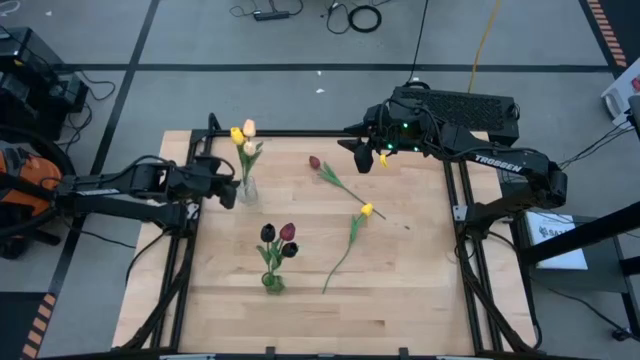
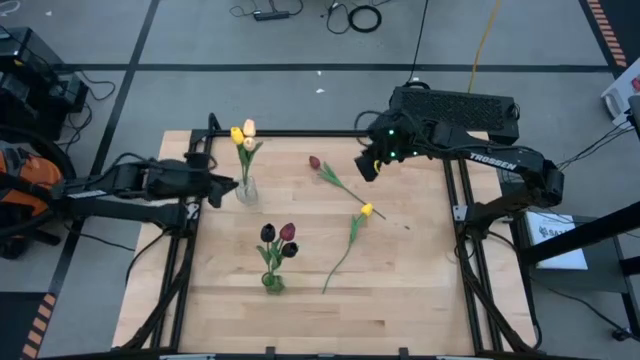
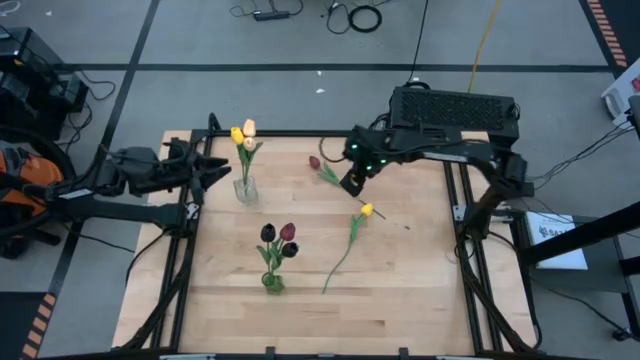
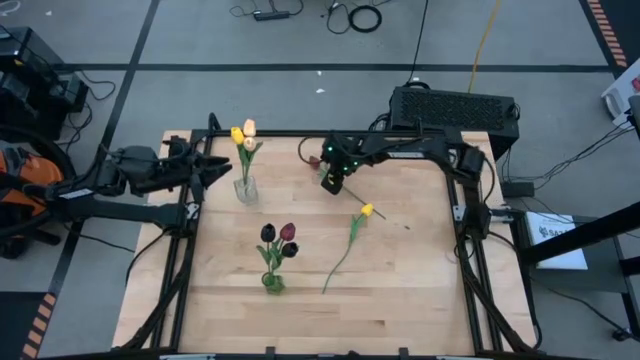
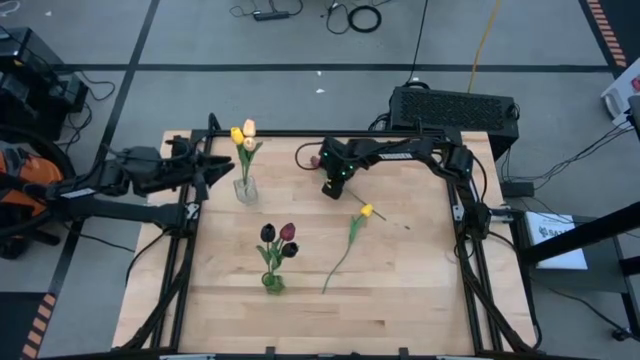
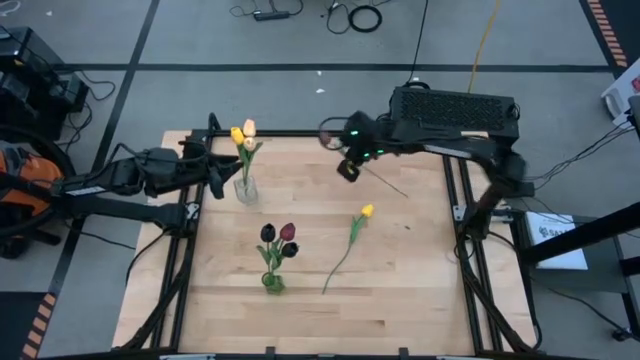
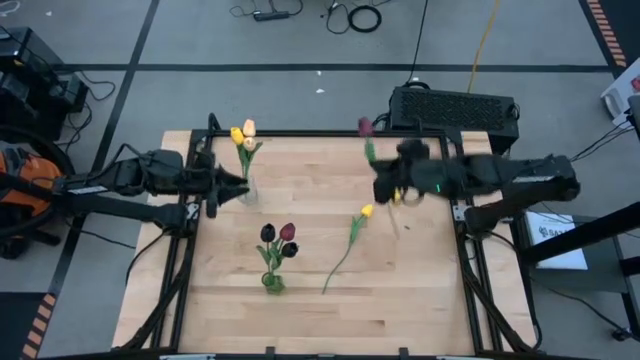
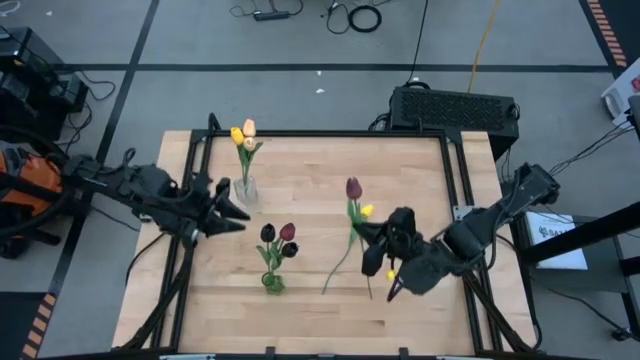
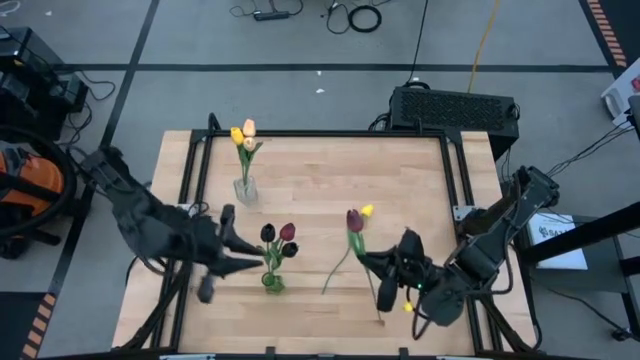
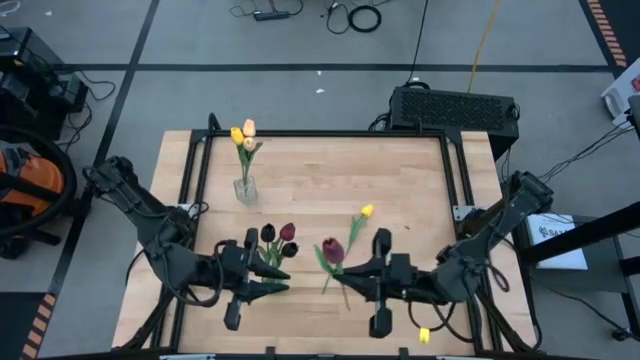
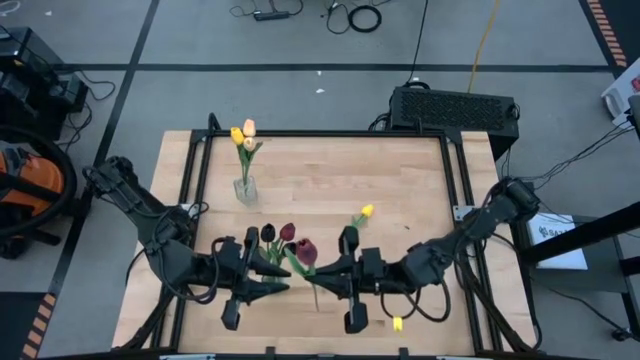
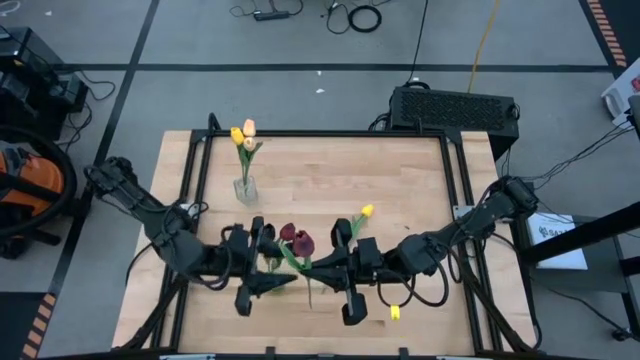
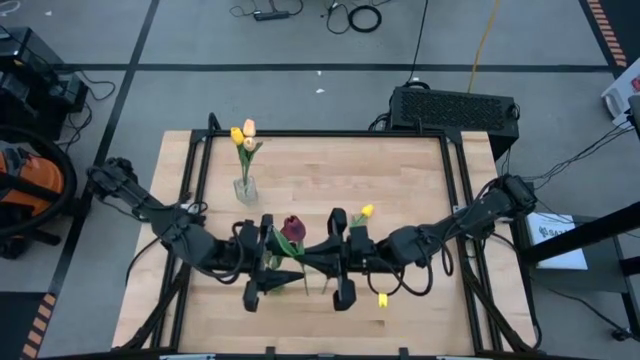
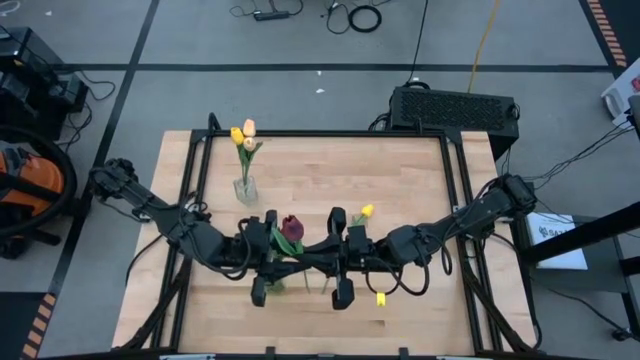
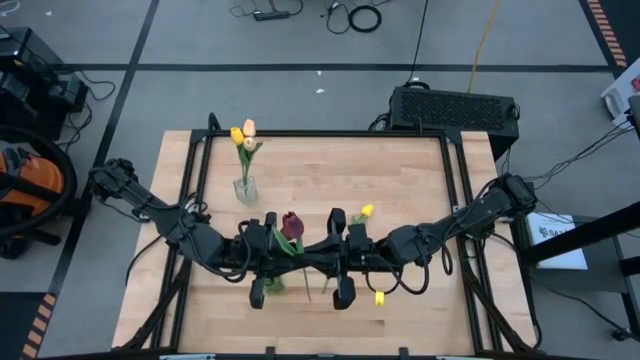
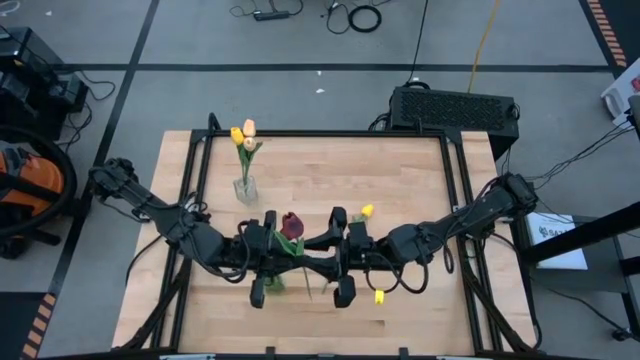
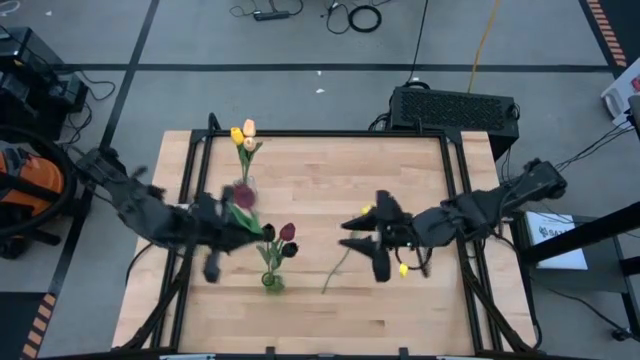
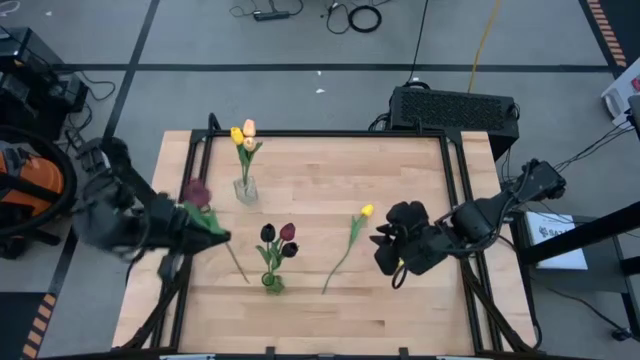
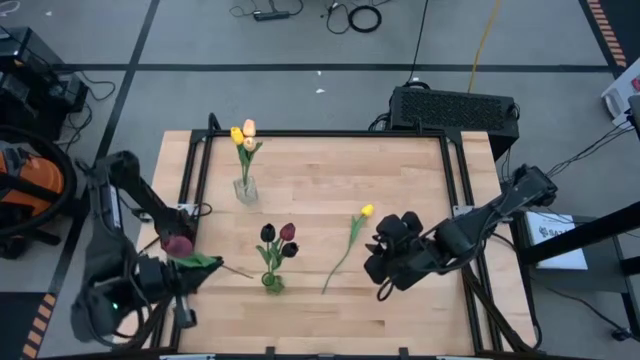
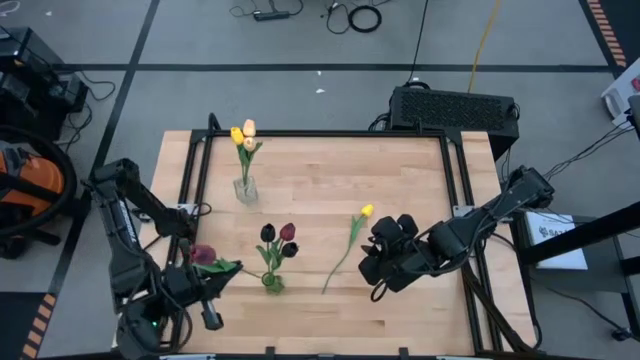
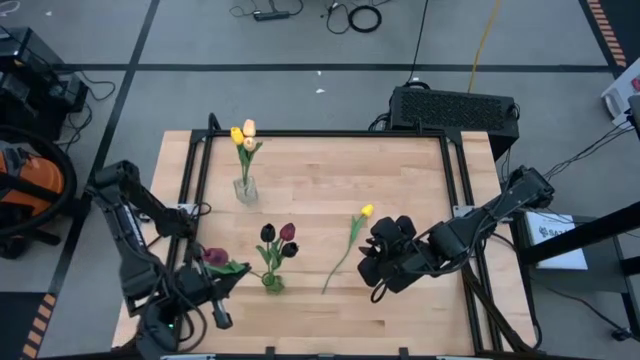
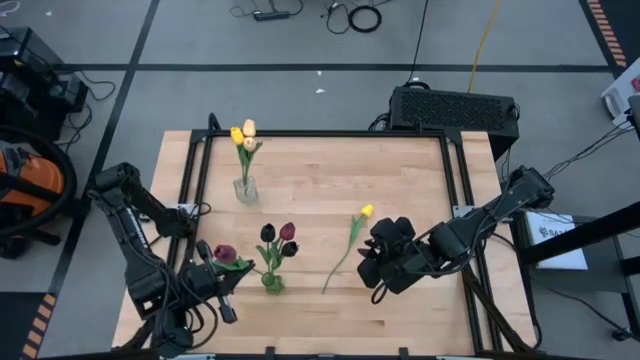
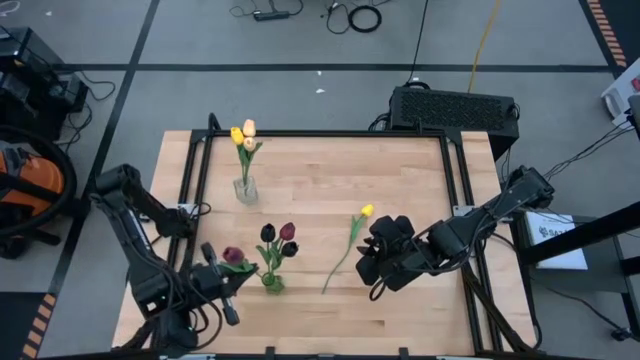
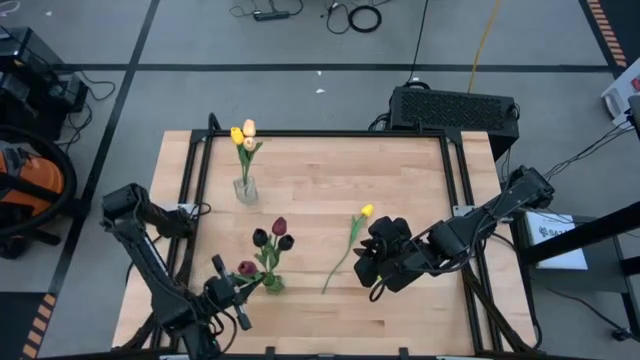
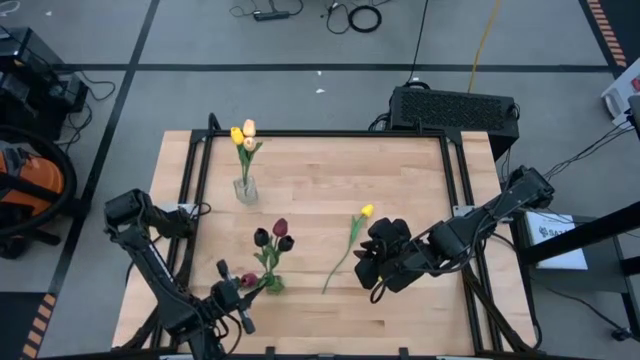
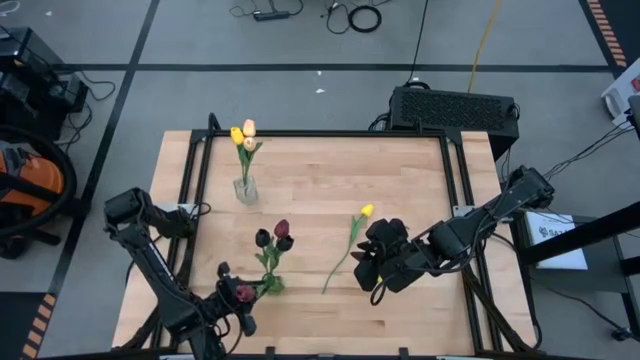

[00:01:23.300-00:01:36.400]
Task: Sort flowers into vase by color
Put the red tulip into the green vase

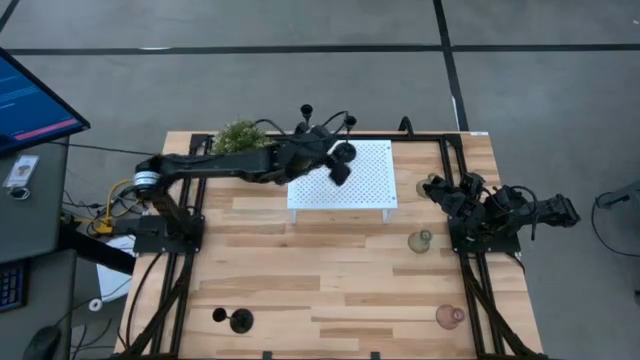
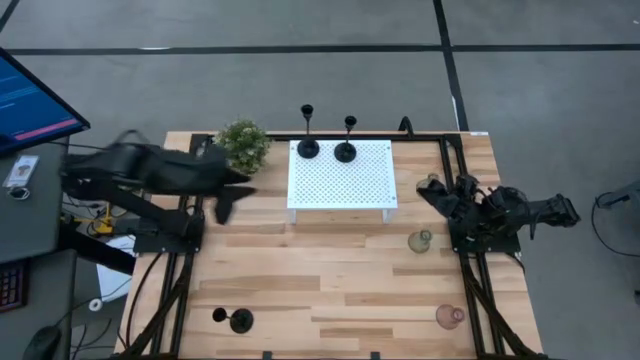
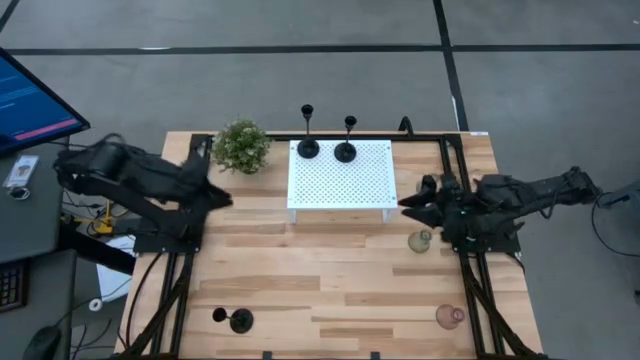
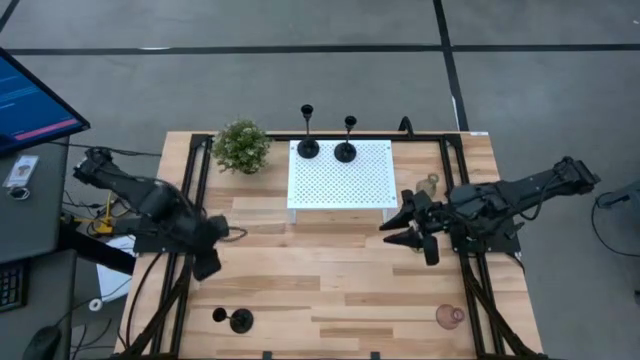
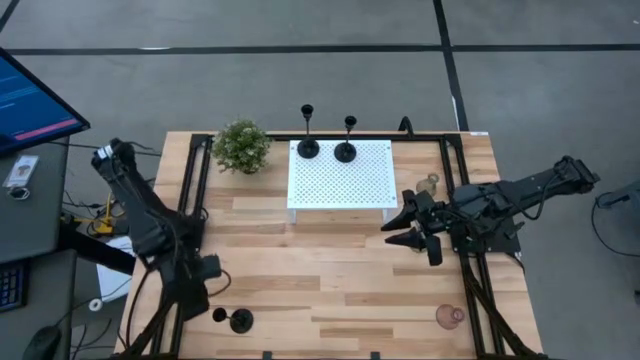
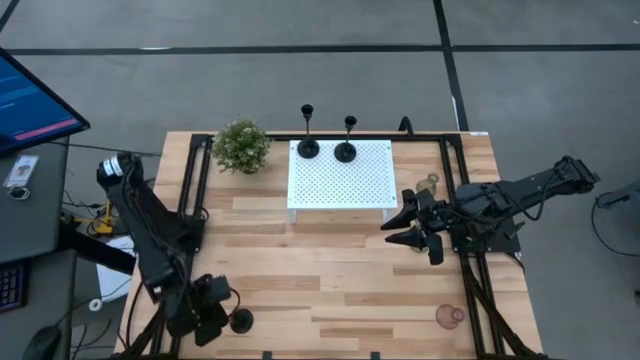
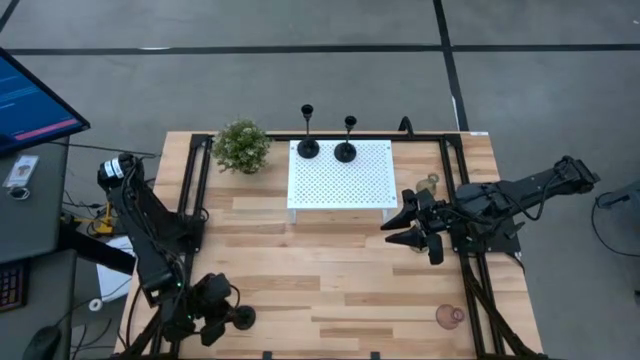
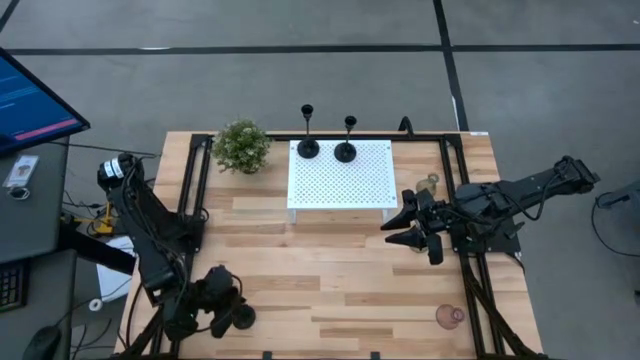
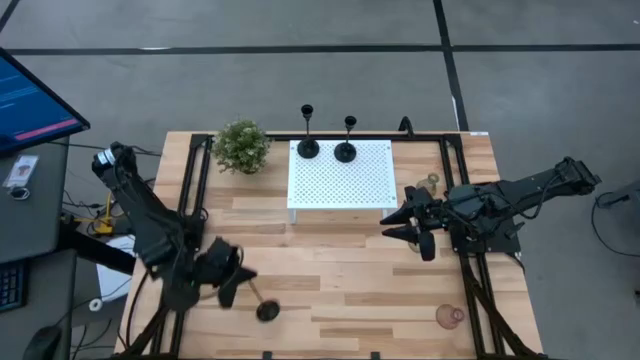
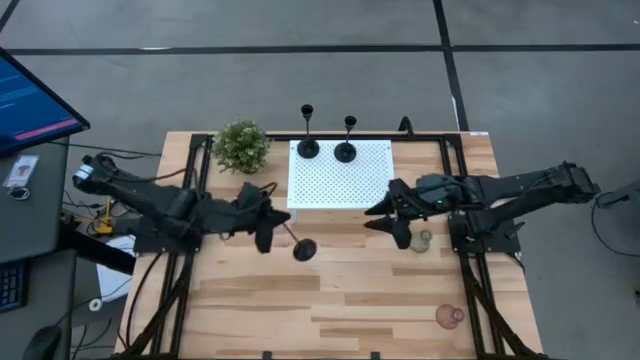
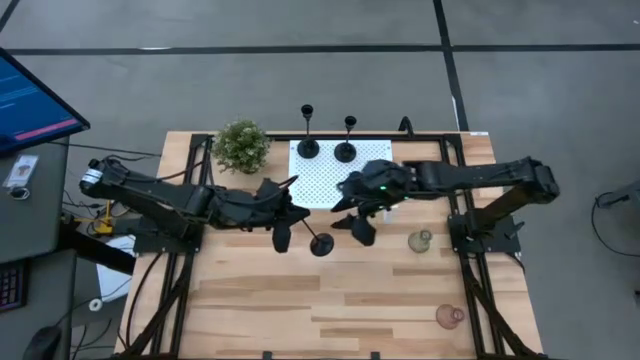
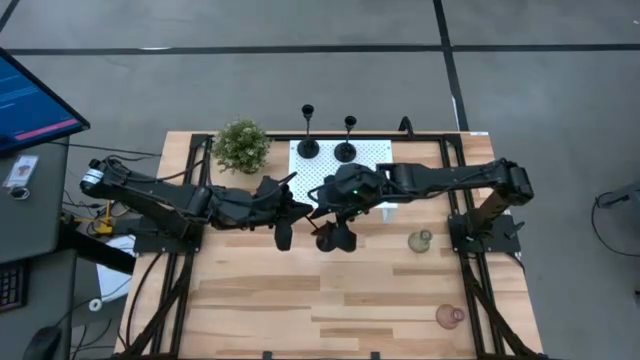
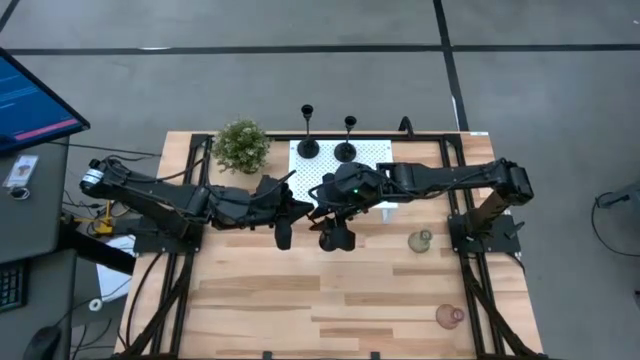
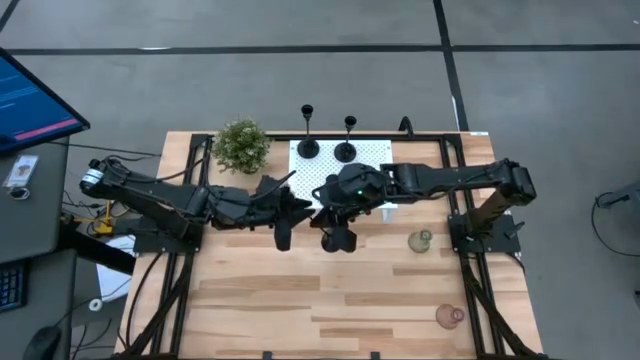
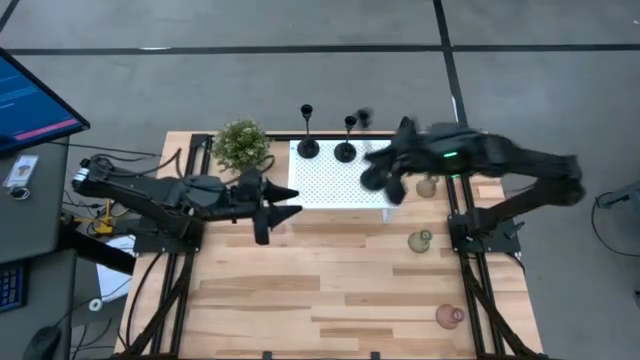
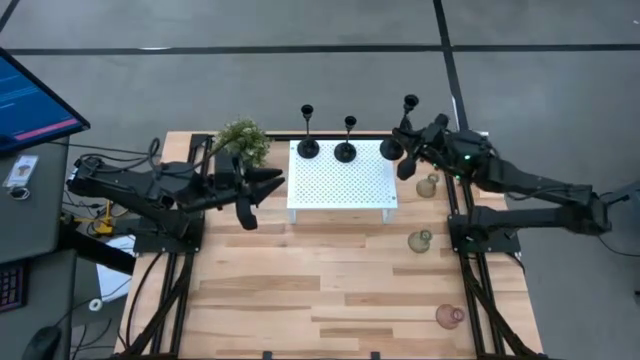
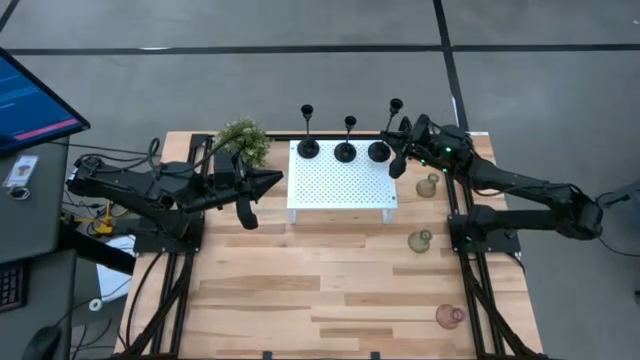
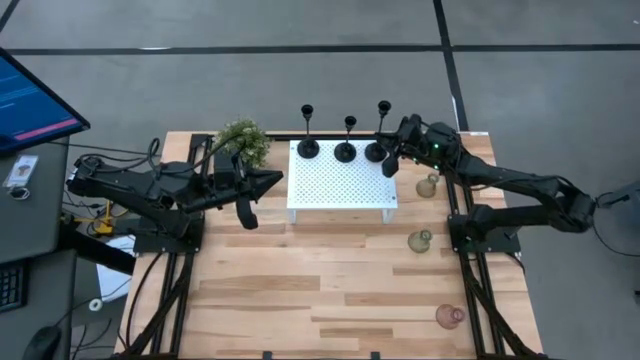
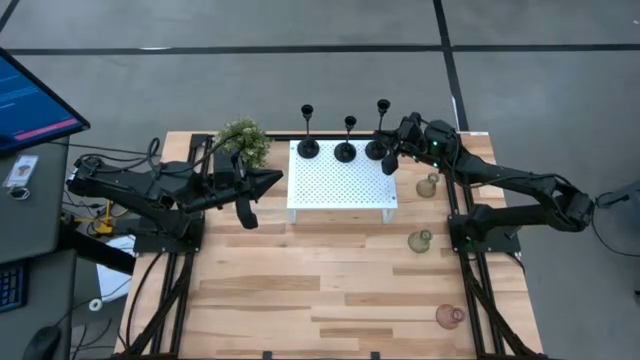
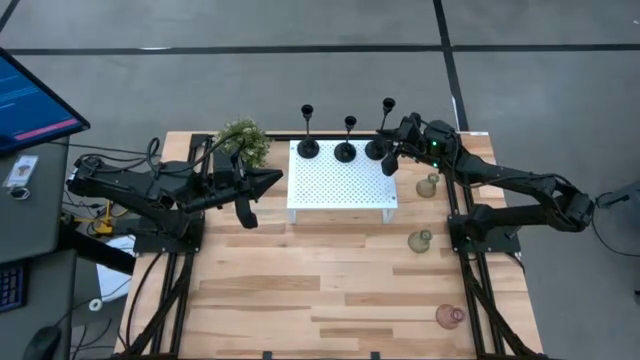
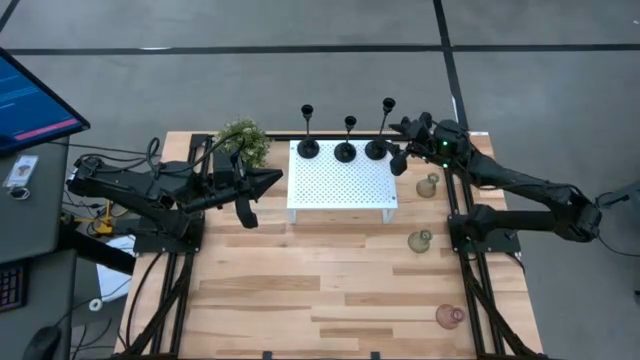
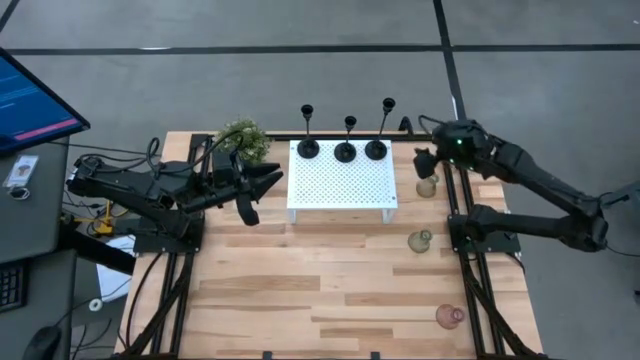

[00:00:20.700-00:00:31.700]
Task: Pick & Place candle stick holders
Put the black candle holder on the shelf
